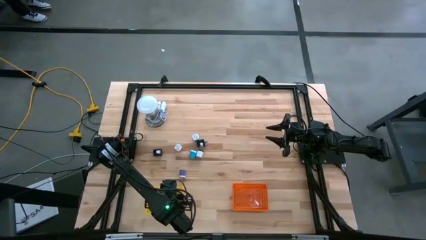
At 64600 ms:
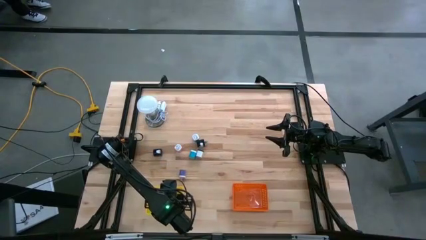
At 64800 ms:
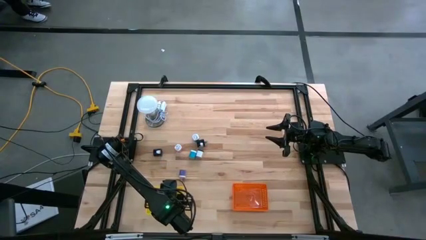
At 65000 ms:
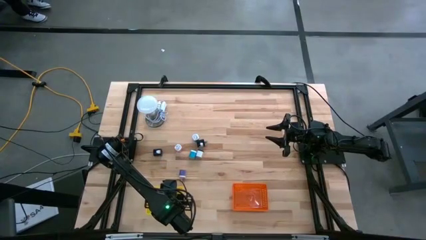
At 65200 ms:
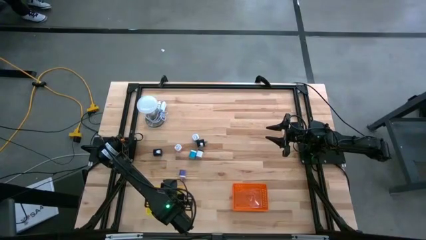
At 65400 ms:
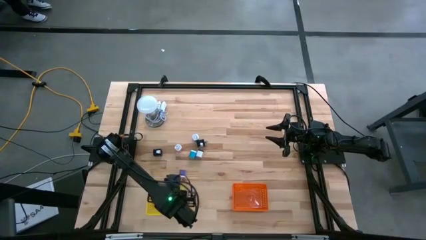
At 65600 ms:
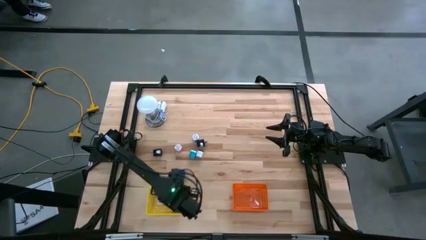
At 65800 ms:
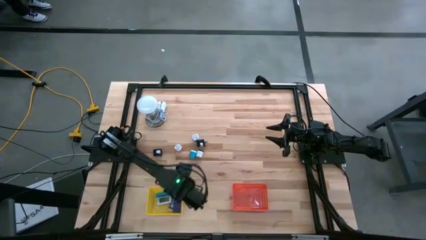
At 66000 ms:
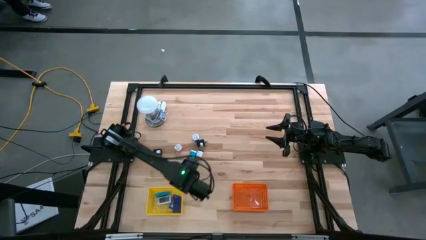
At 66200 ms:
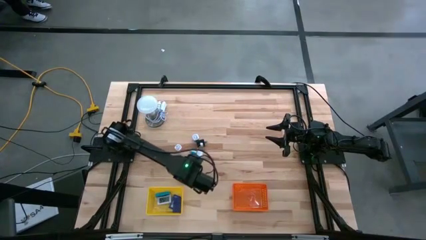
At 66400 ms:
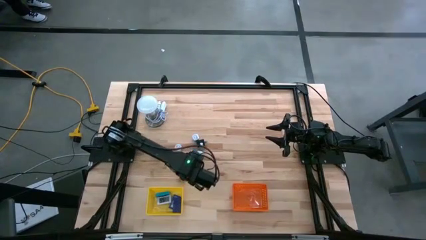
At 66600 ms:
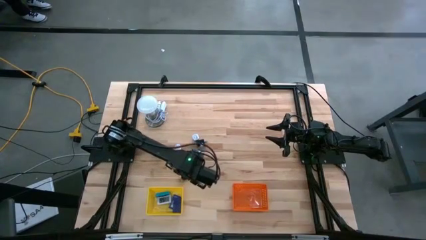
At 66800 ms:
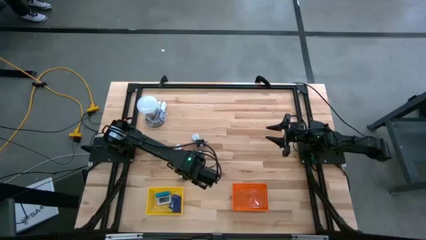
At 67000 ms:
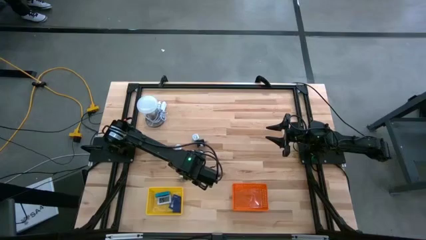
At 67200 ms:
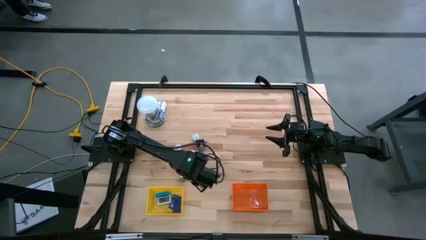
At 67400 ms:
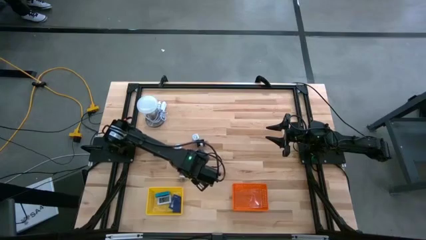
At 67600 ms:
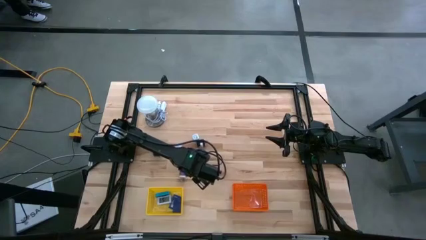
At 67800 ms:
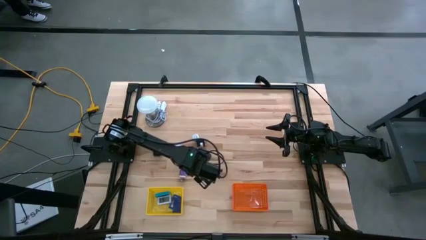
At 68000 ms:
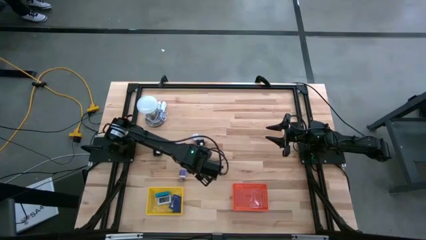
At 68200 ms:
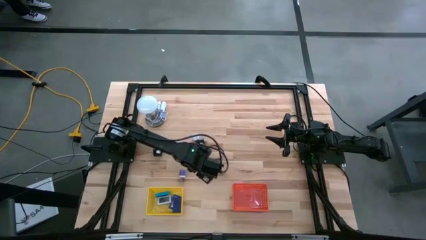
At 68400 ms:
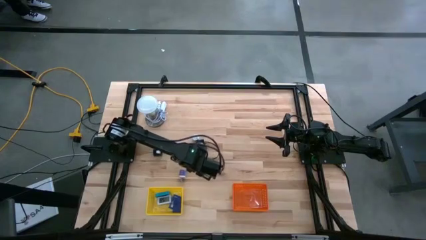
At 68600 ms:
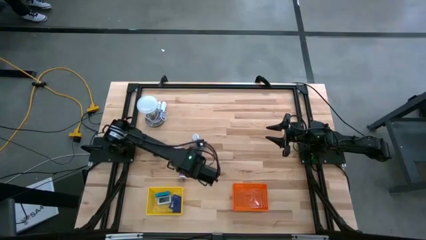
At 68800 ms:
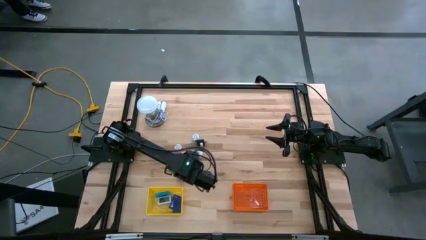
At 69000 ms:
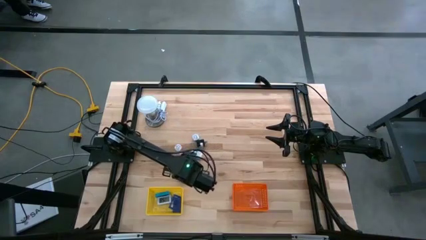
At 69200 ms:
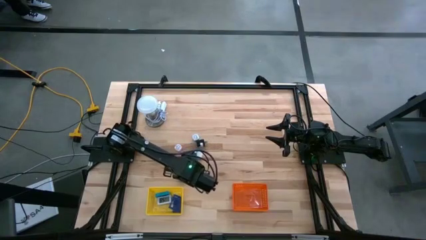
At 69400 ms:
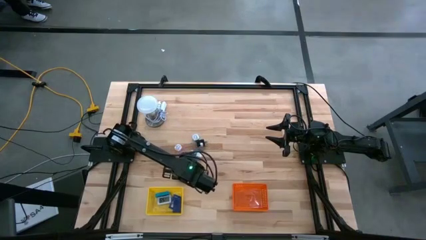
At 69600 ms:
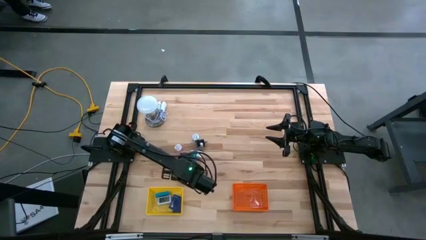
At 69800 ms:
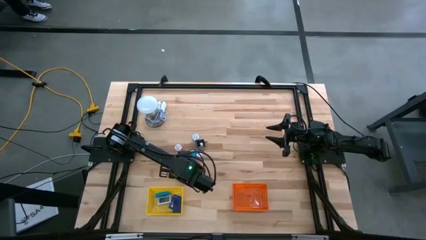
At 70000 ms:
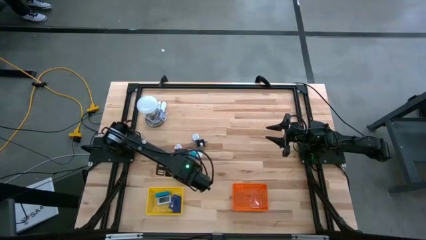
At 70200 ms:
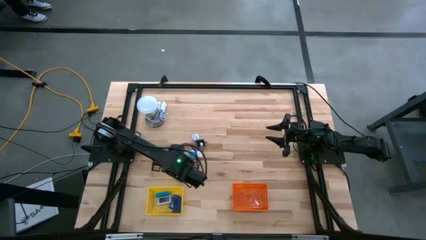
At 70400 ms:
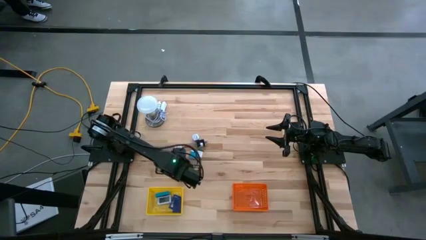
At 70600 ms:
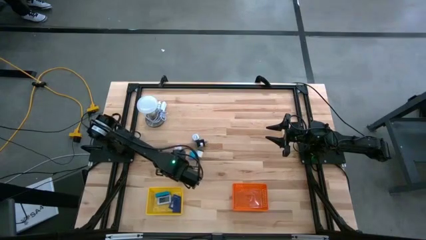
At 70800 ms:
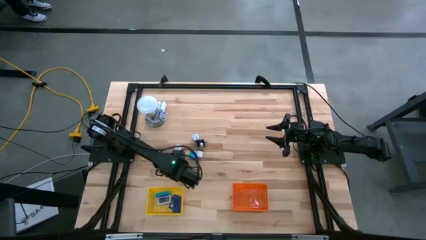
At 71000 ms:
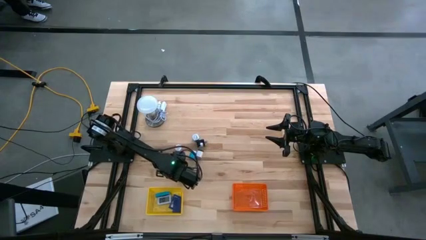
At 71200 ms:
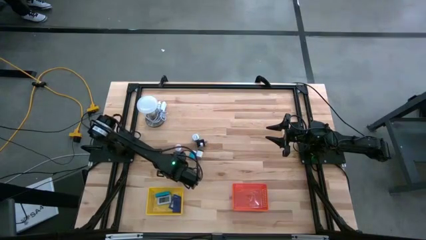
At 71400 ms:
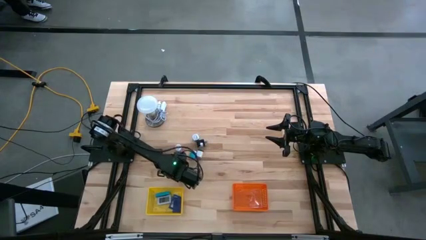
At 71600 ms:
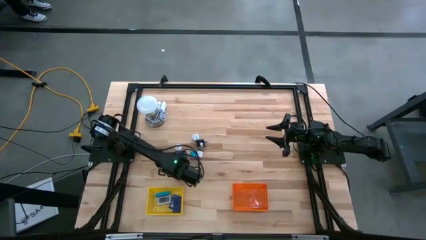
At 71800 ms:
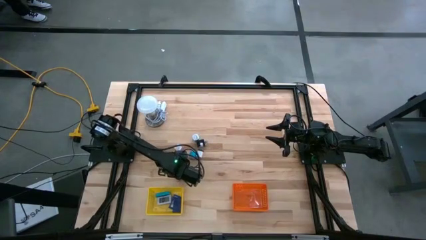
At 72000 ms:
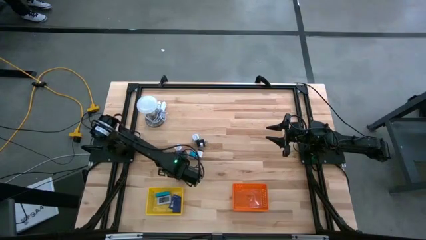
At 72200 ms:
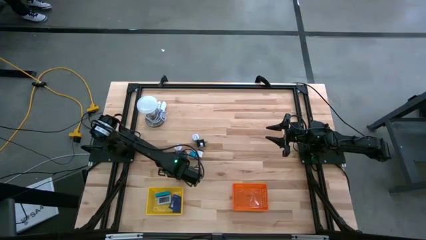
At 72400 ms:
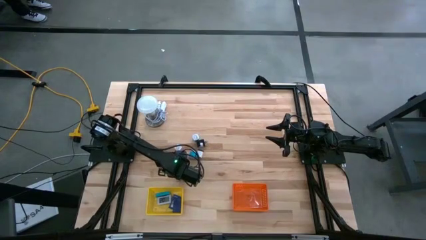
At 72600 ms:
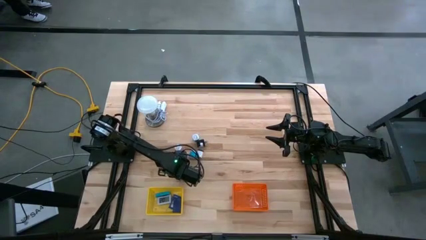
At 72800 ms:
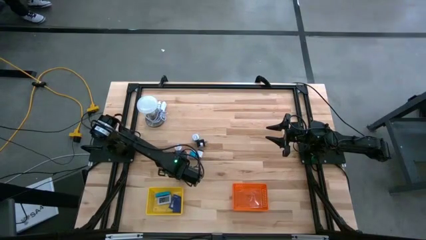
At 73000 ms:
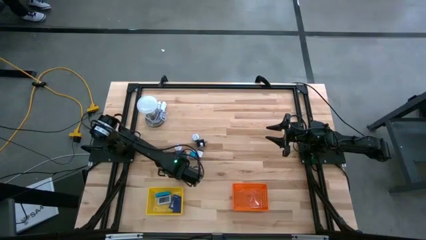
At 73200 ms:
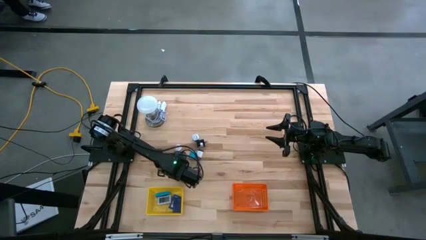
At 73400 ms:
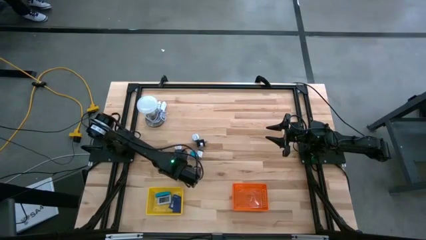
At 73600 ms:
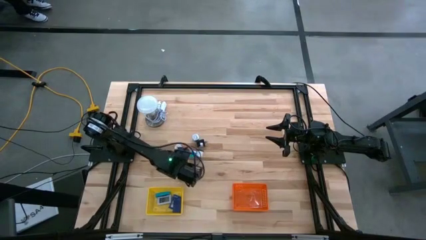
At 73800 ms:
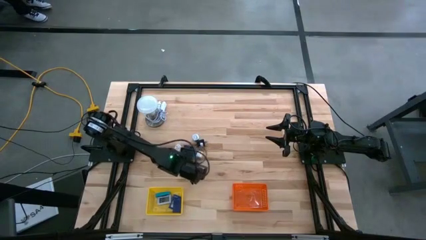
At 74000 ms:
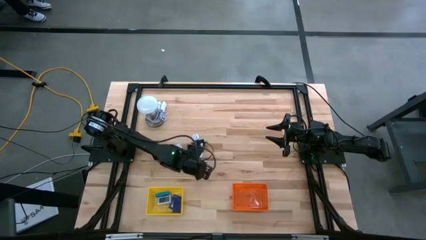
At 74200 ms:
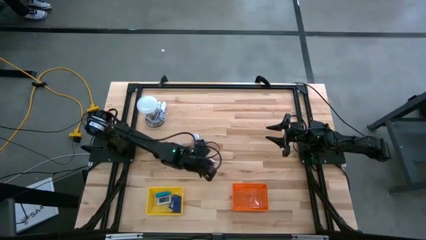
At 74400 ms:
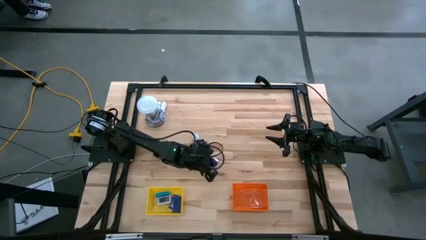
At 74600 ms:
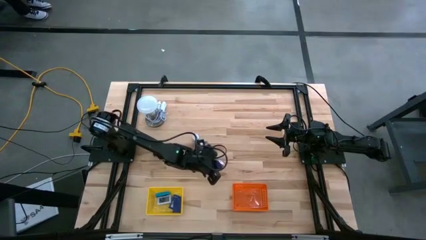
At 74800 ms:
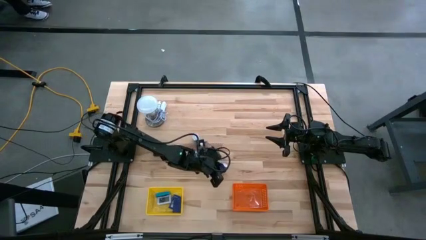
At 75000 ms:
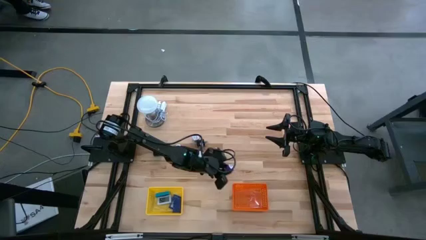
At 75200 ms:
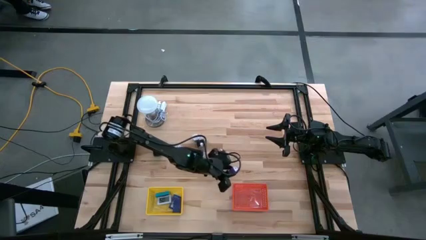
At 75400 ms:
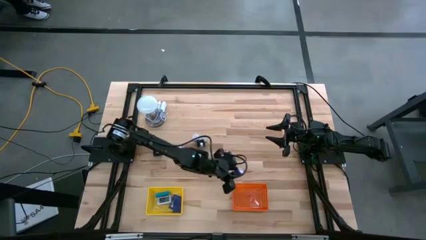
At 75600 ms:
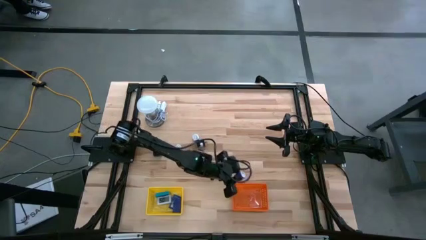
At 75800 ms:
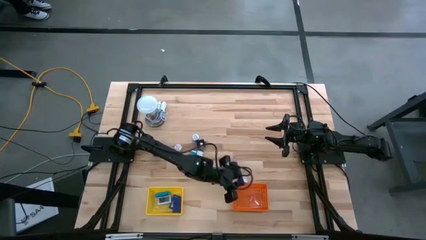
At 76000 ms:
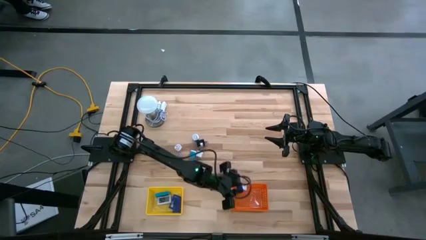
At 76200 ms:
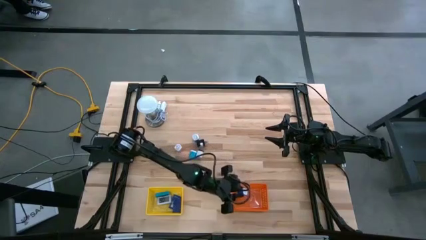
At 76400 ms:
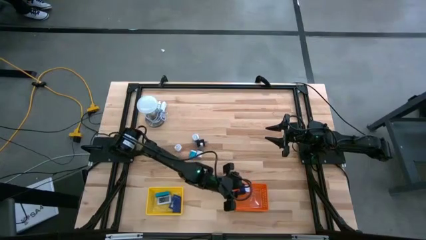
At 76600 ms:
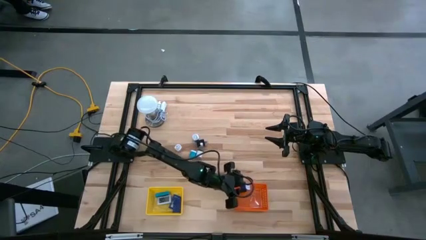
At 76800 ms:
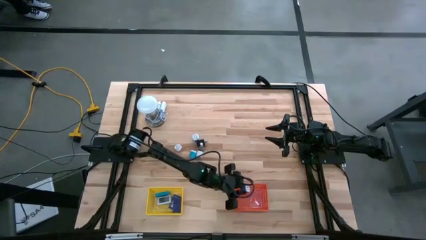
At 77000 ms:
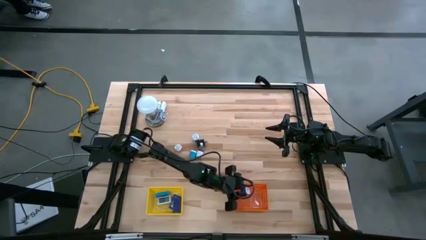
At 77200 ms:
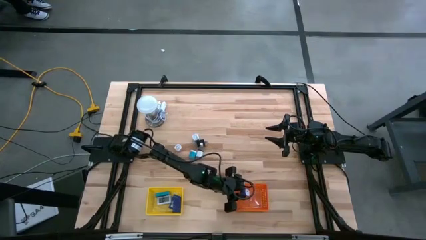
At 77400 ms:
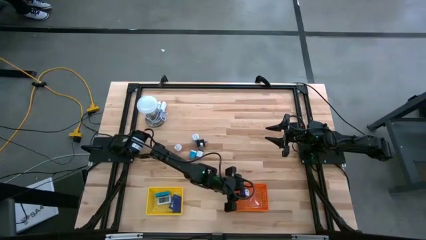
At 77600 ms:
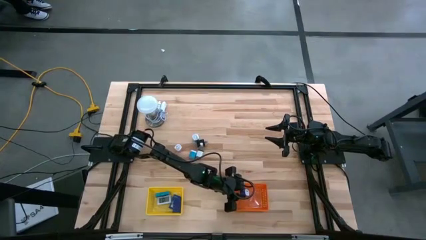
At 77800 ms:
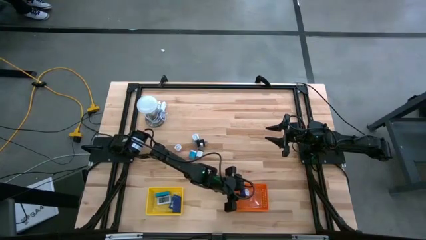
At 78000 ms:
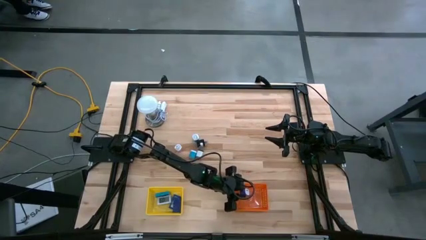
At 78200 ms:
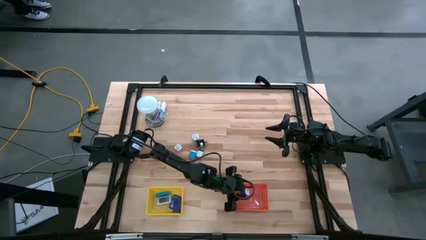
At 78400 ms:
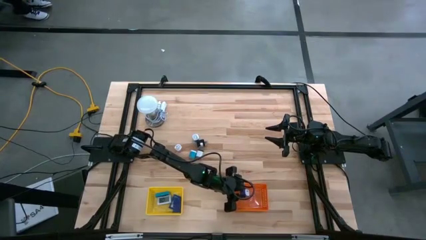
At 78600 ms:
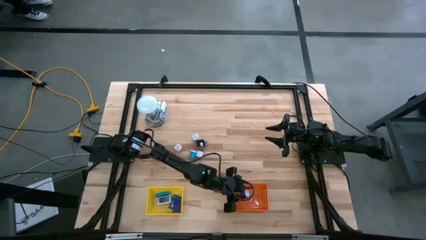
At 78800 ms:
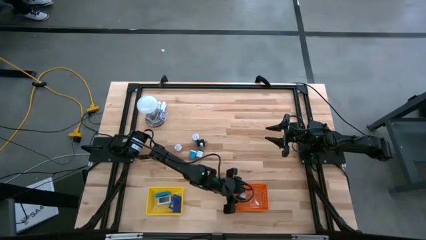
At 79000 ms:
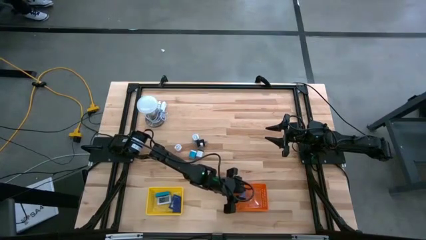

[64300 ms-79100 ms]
Task: Pick & Place Office items
Put the violet charger adapter into the orange bin
